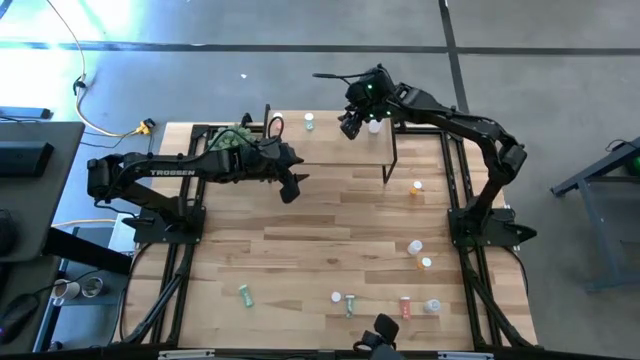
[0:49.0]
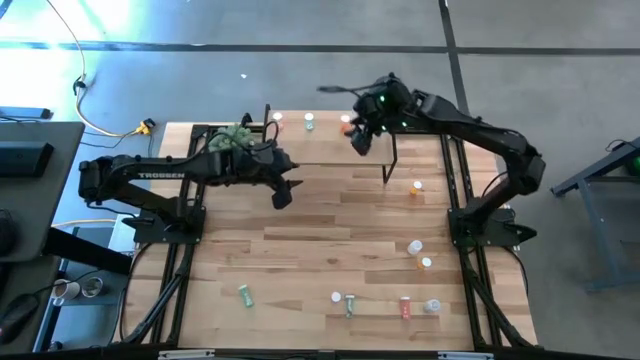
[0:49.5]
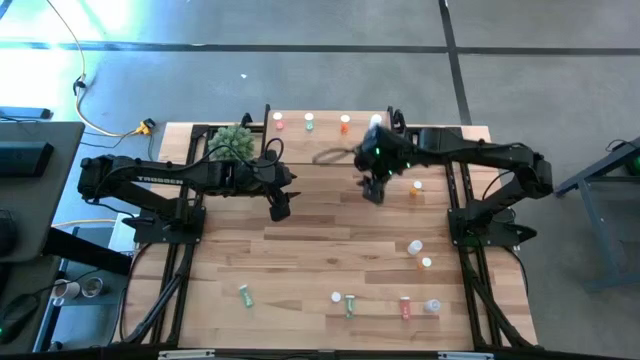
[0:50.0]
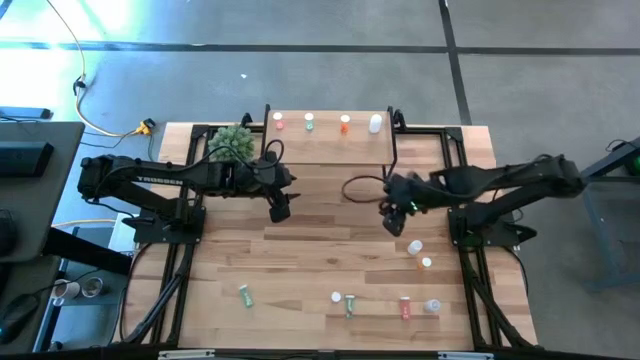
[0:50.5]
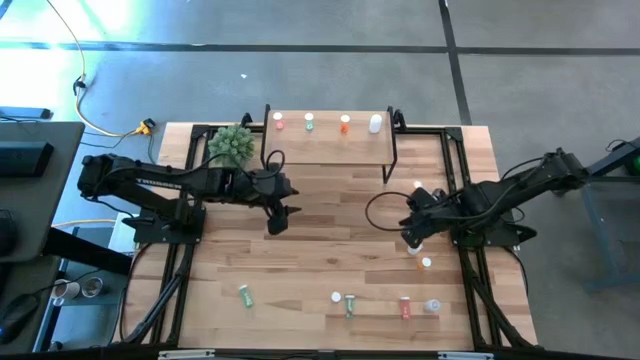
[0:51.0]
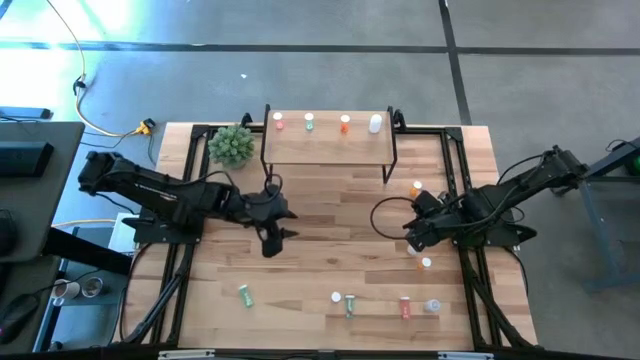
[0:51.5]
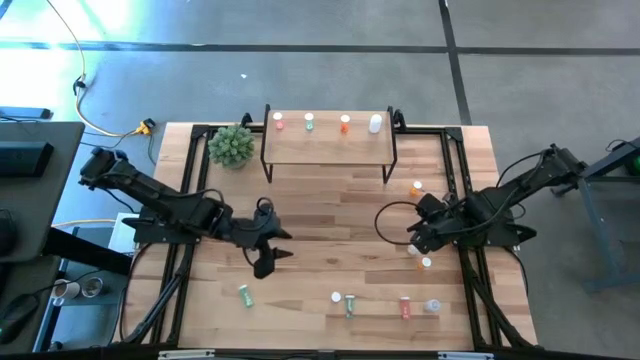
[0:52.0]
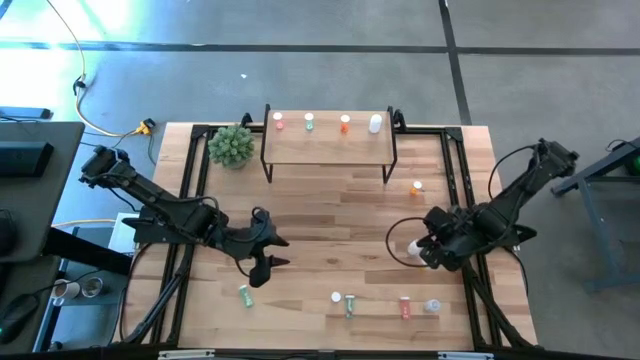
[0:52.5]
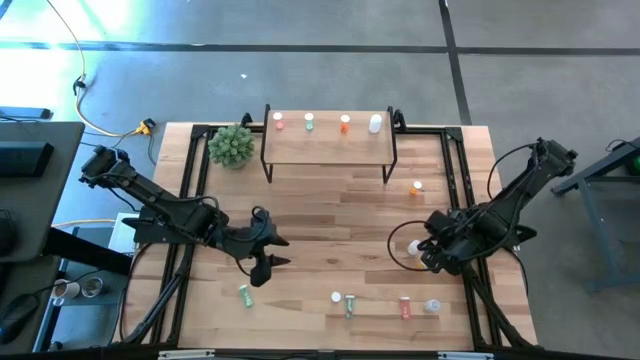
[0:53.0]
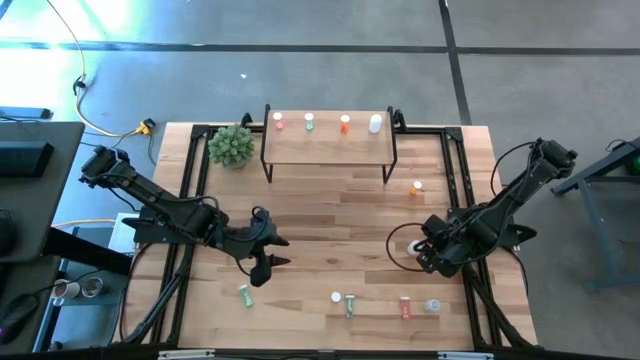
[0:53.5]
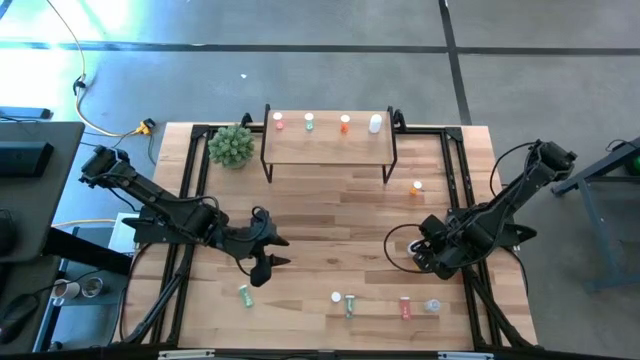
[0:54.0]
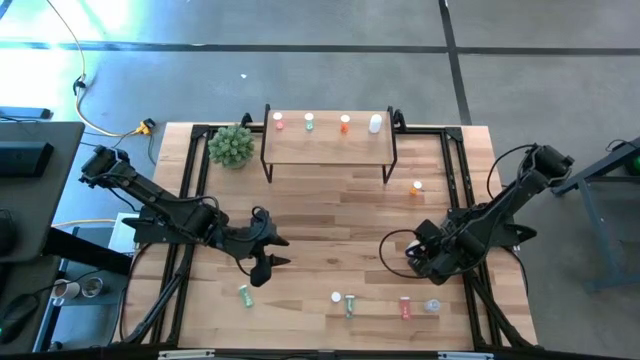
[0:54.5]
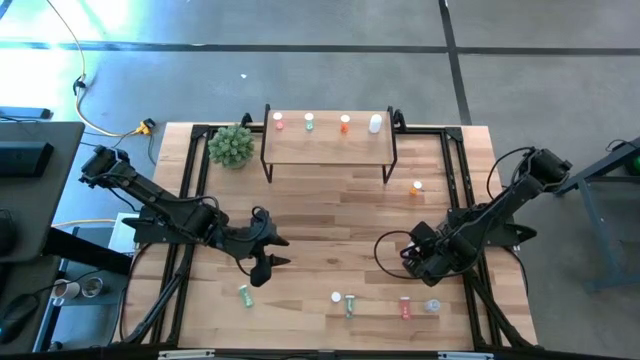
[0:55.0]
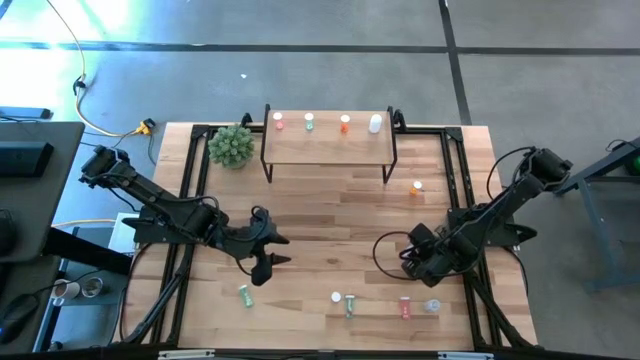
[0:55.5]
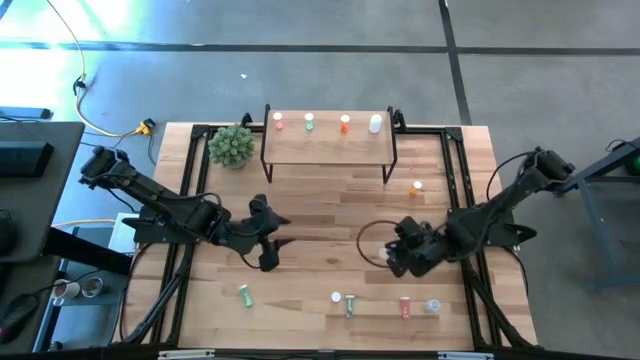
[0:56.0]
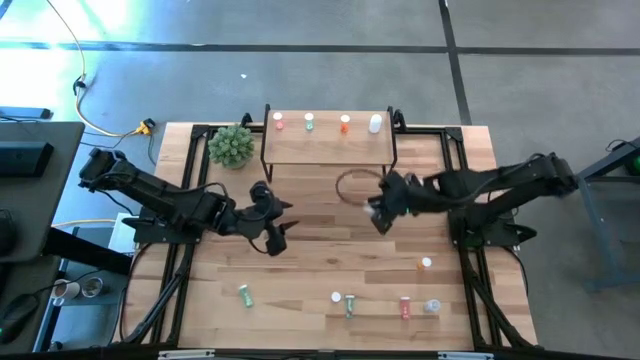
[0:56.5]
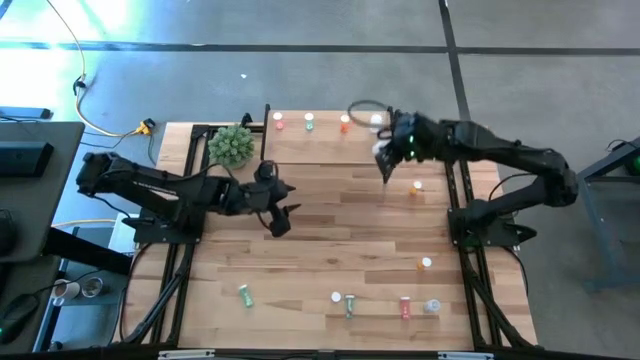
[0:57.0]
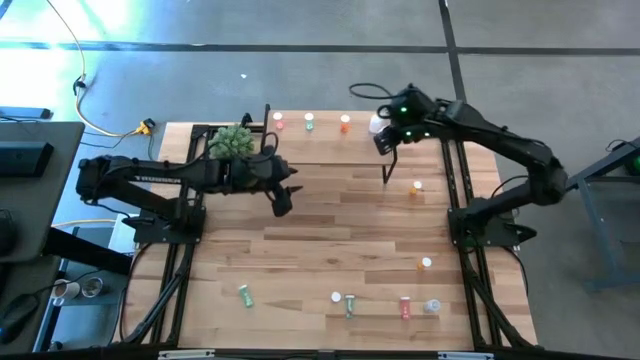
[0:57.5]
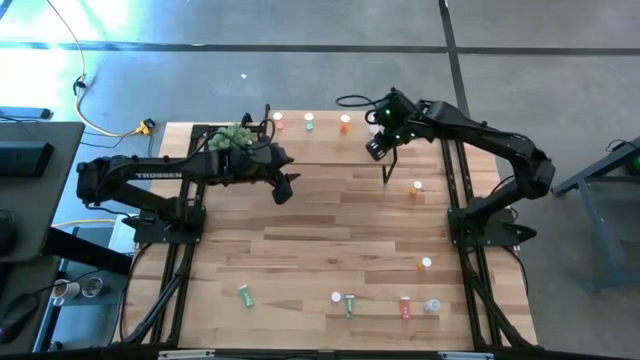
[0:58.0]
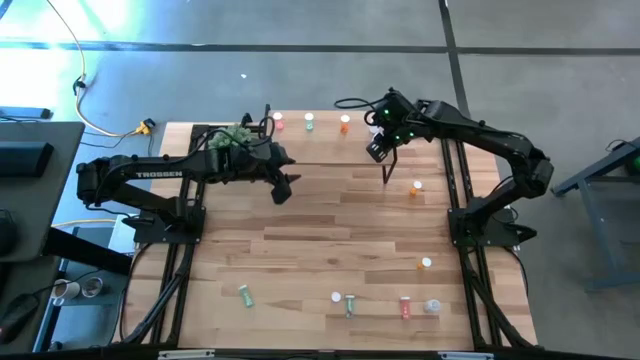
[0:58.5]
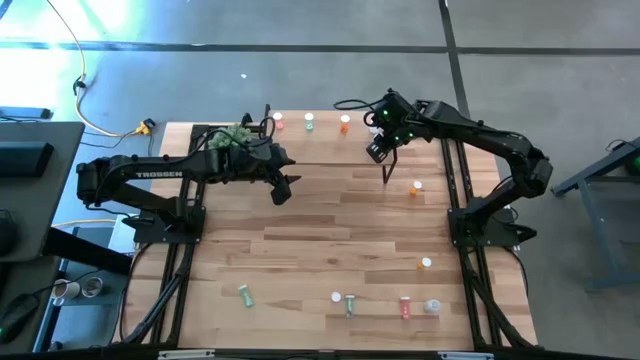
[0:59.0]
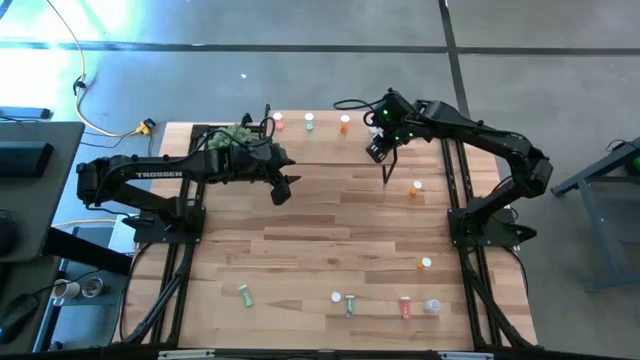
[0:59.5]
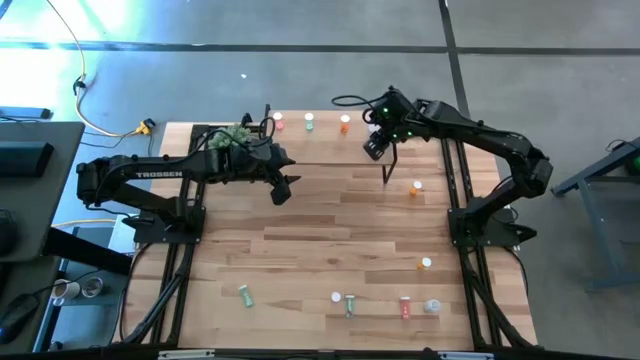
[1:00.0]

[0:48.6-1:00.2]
Task: Pick and place medicine bottles onto shelf by color
Put the top white pill bottle on the shelf aligned with the other white pill bottle

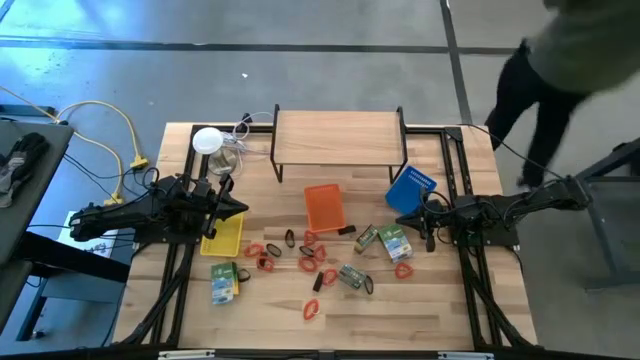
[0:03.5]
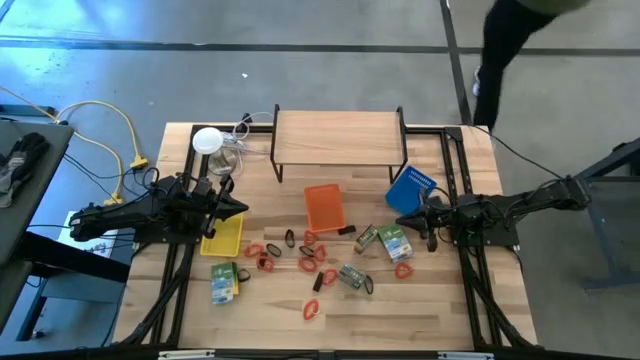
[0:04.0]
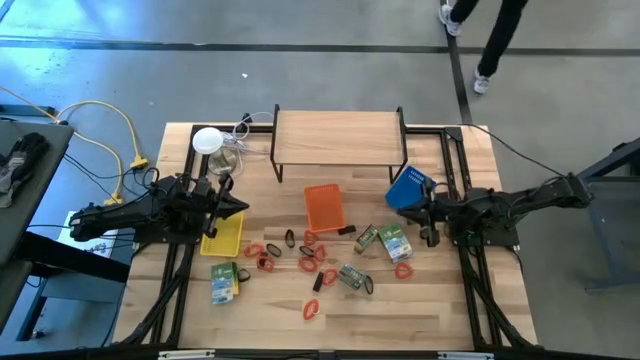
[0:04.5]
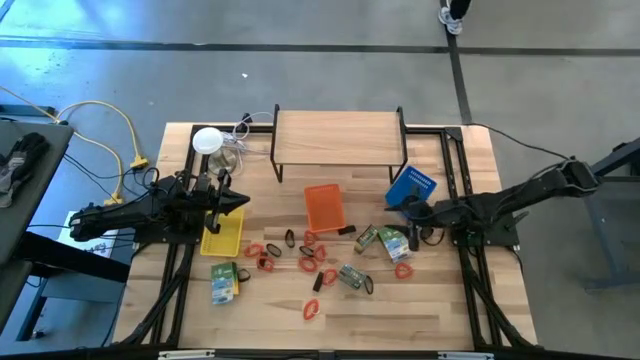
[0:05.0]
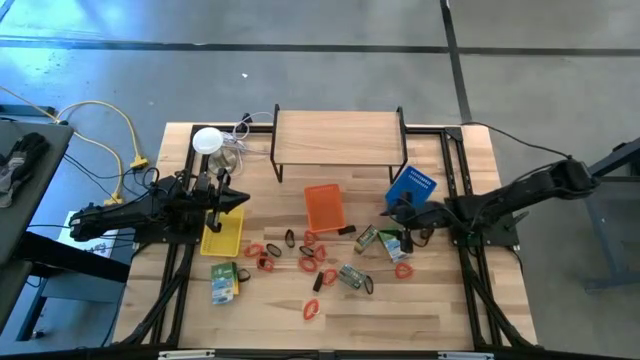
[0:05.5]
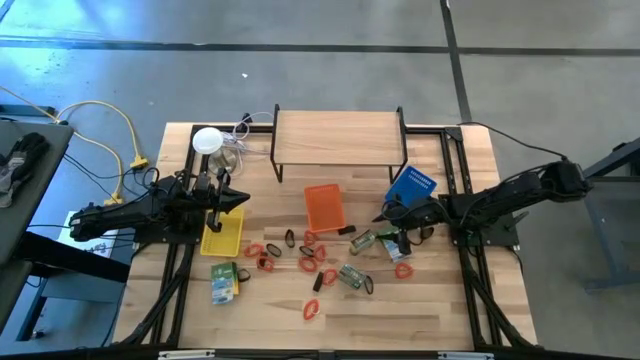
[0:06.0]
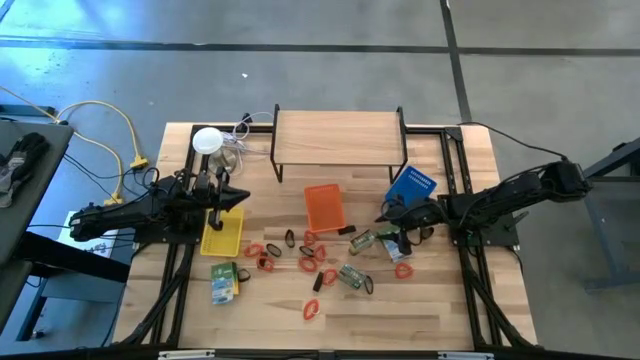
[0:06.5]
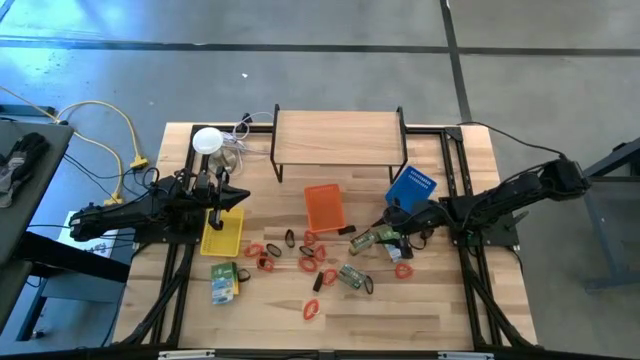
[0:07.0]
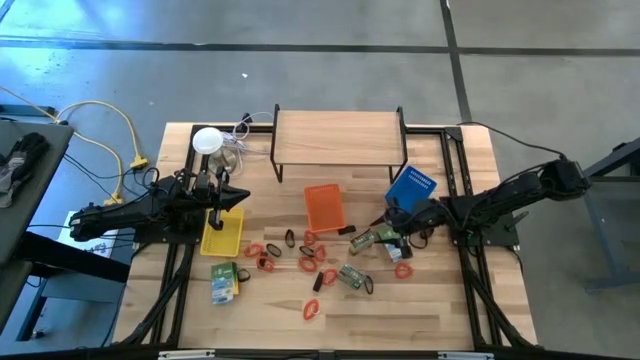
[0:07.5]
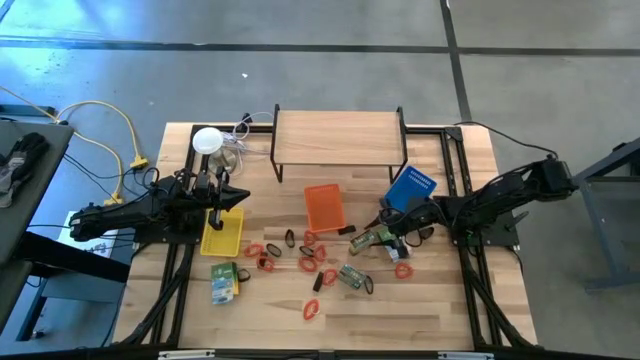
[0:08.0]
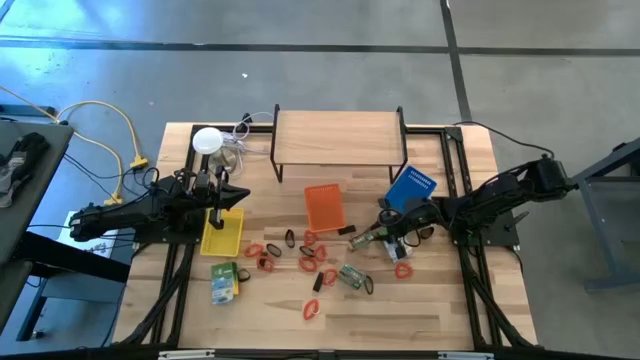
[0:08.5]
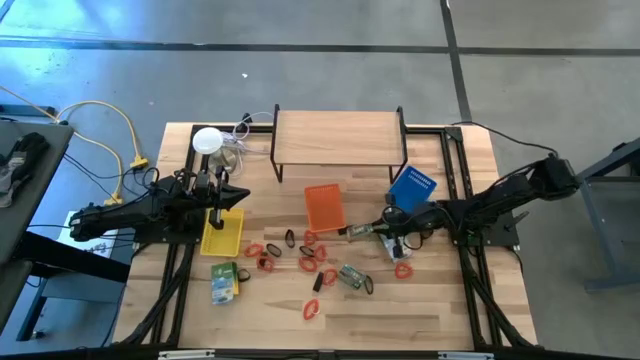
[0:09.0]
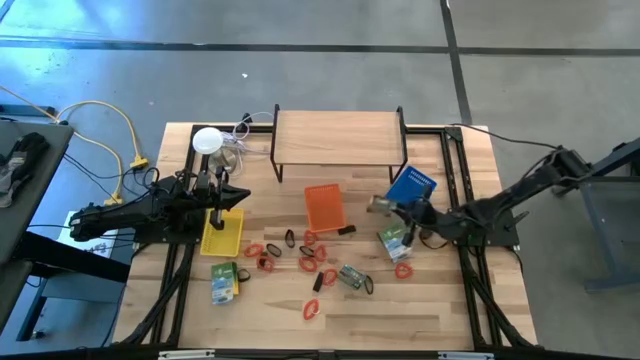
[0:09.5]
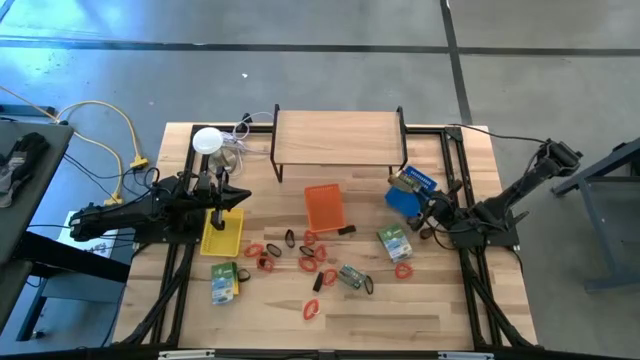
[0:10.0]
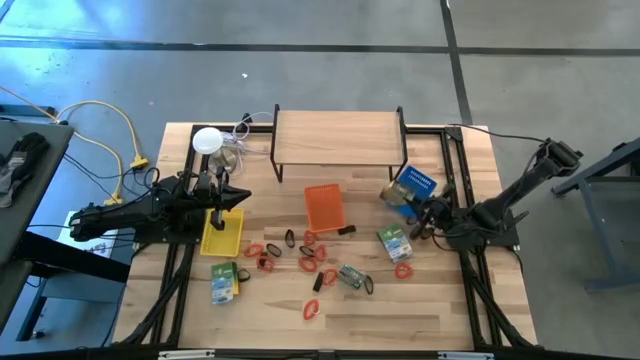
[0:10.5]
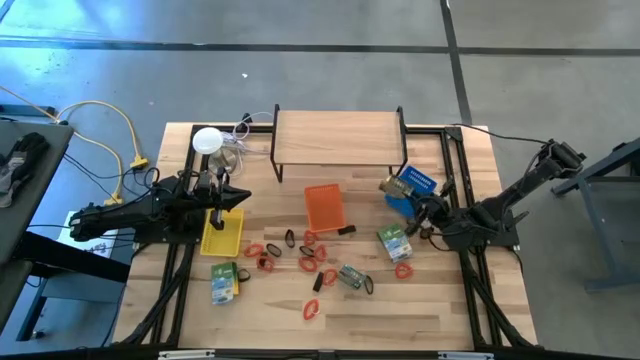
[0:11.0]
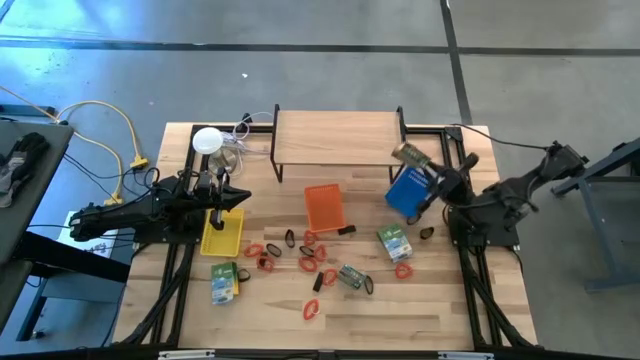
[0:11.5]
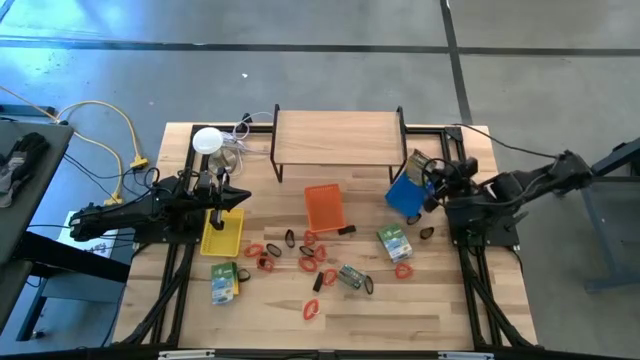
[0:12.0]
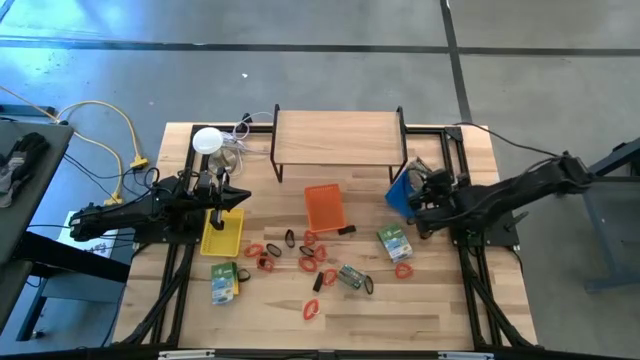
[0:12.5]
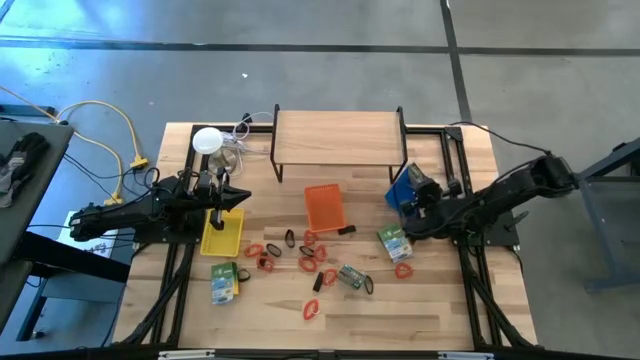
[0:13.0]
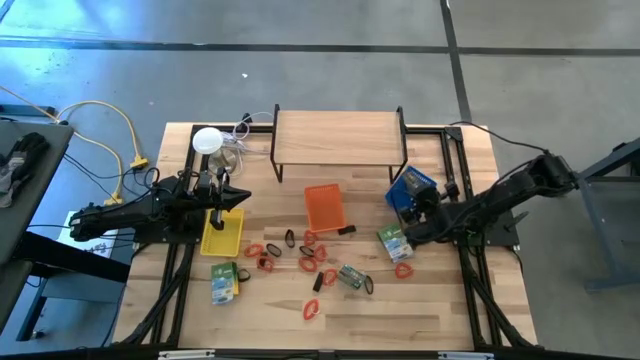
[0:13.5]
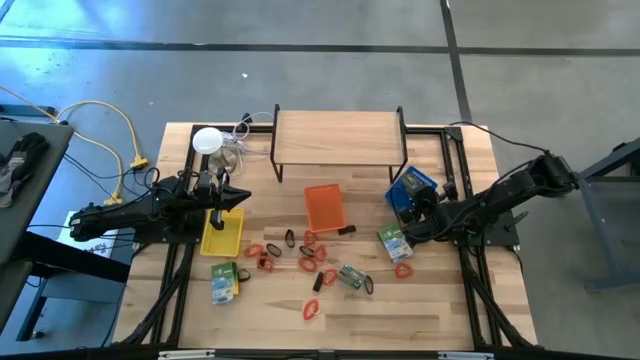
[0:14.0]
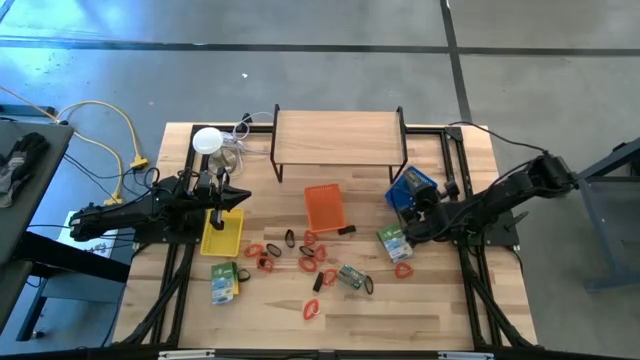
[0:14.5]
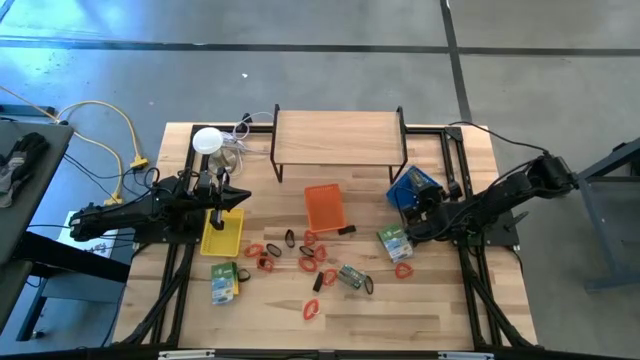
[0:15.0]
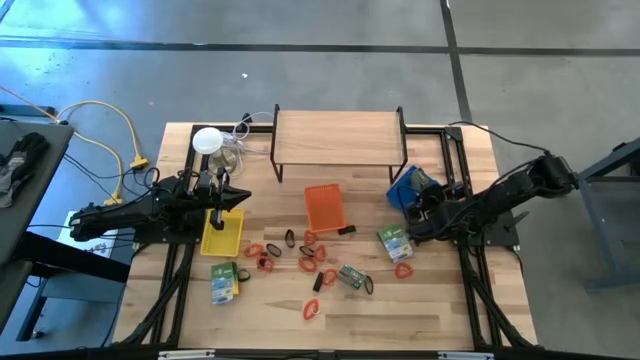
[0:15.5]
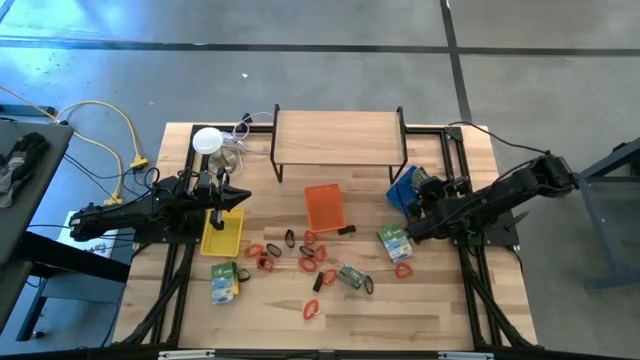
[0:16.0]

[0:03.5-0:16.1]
Task: Pick & Place Office Desk Supplies
Put the yellow crayon box into the blue bin
